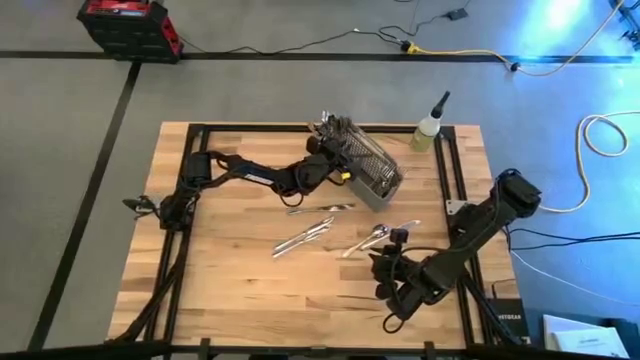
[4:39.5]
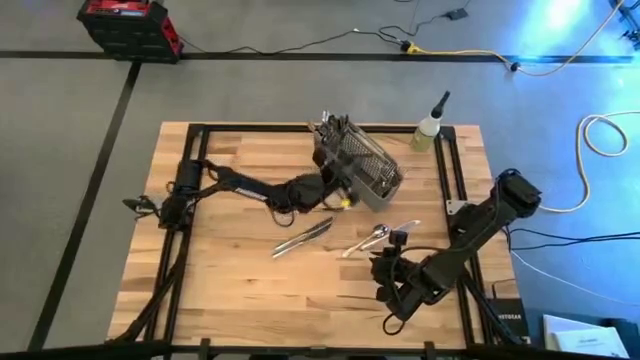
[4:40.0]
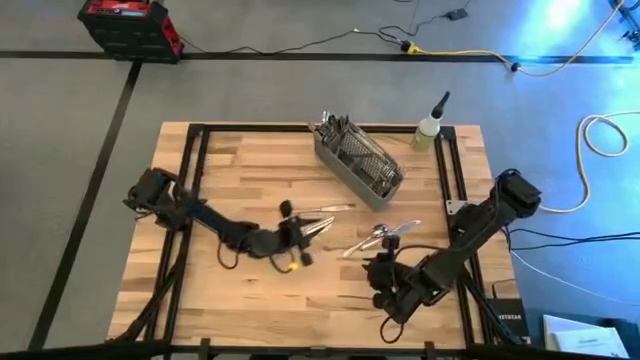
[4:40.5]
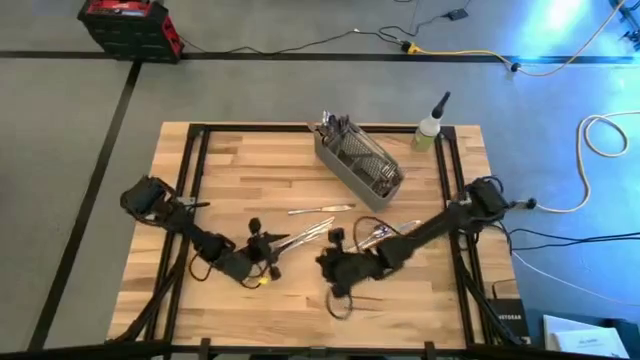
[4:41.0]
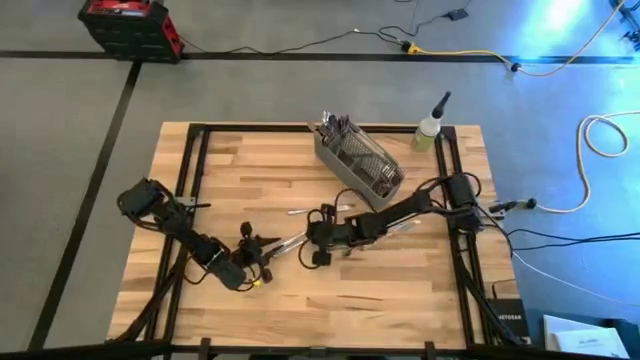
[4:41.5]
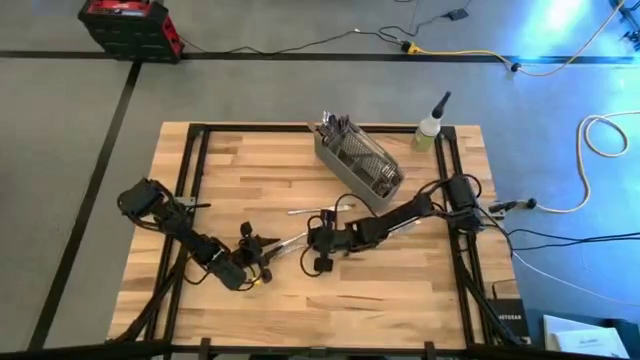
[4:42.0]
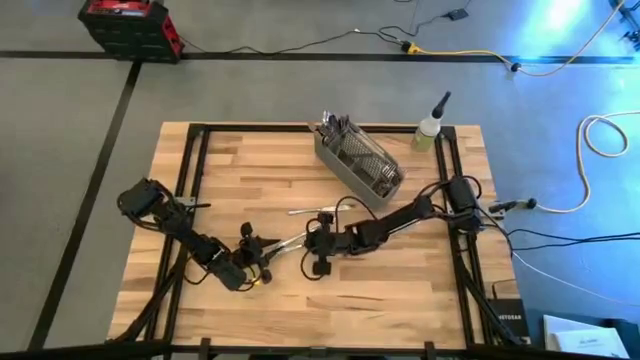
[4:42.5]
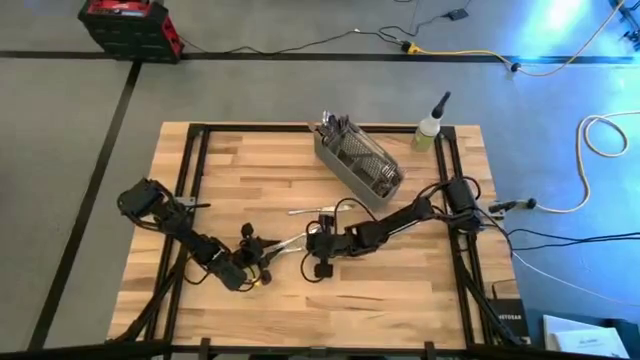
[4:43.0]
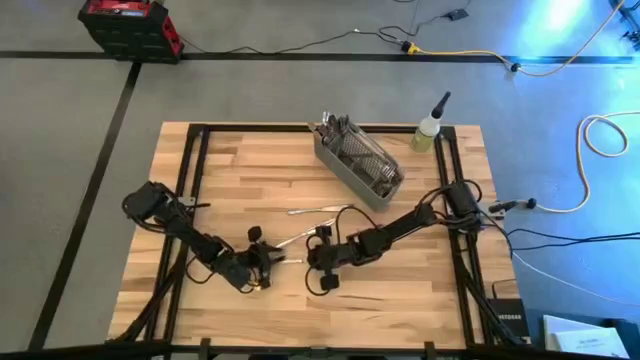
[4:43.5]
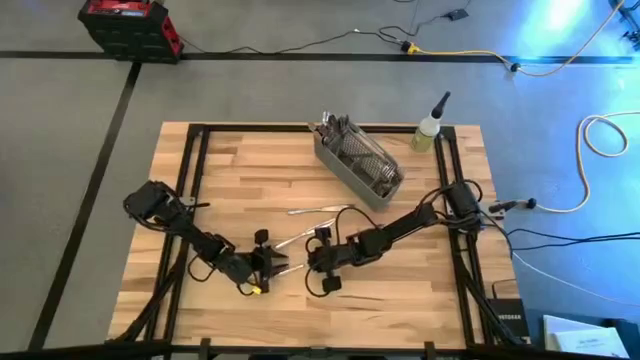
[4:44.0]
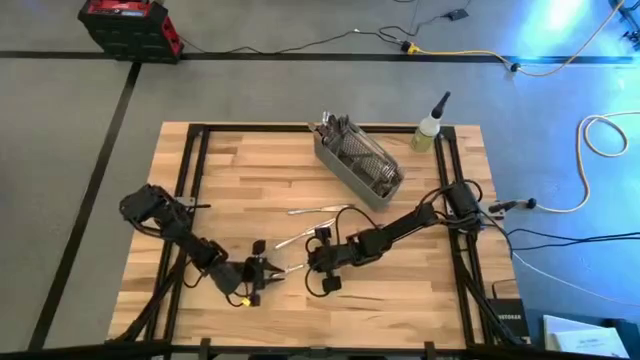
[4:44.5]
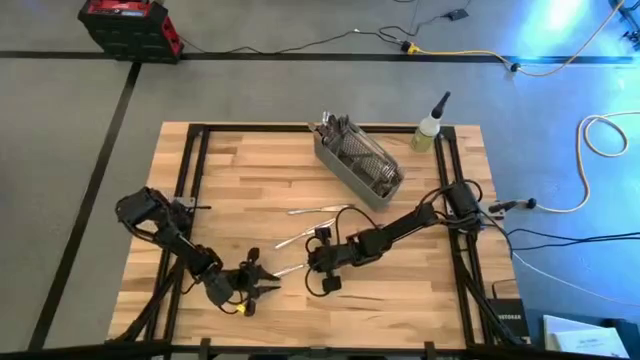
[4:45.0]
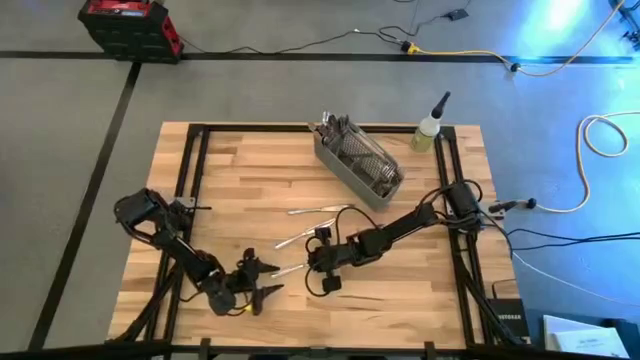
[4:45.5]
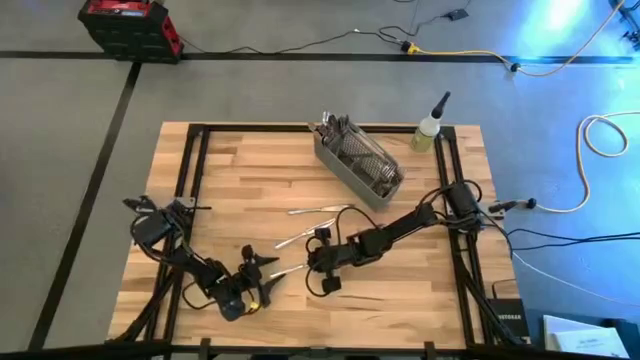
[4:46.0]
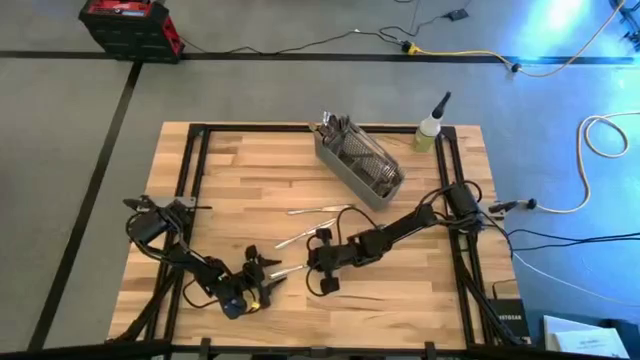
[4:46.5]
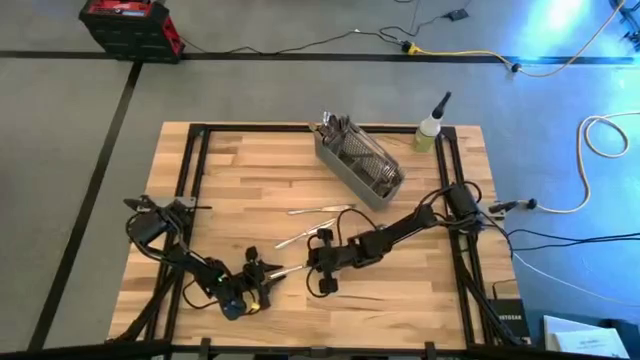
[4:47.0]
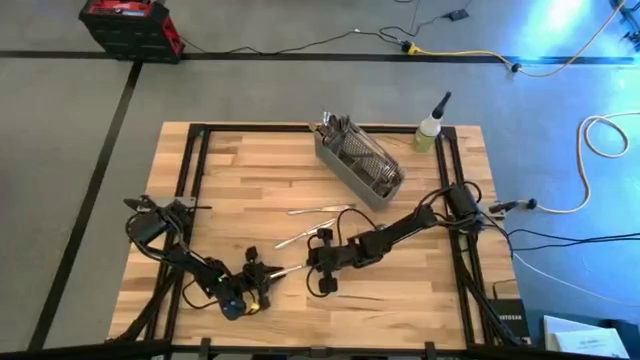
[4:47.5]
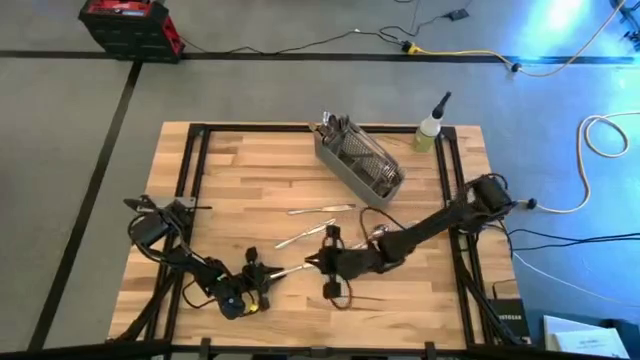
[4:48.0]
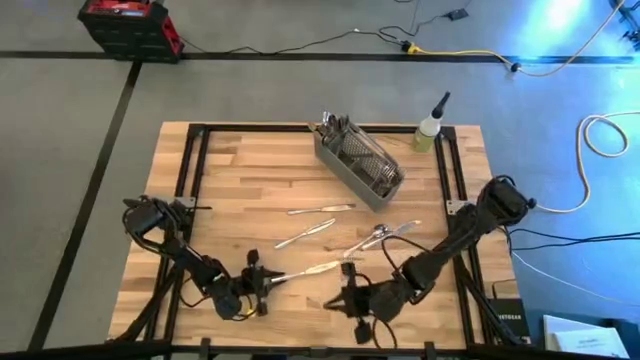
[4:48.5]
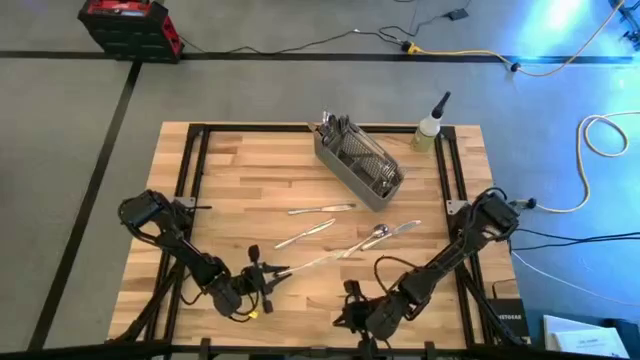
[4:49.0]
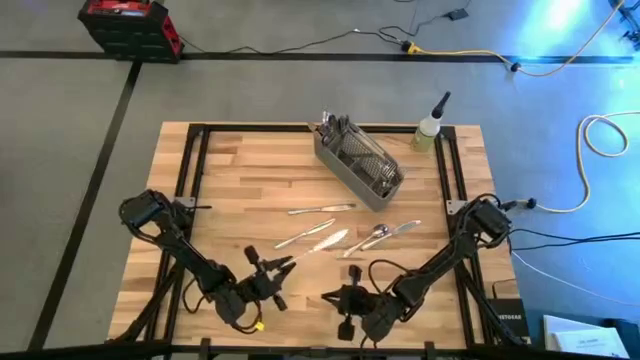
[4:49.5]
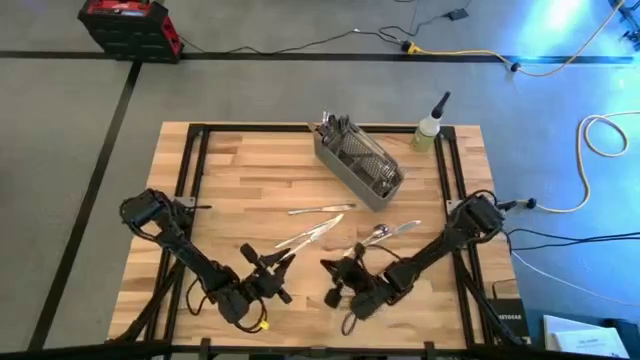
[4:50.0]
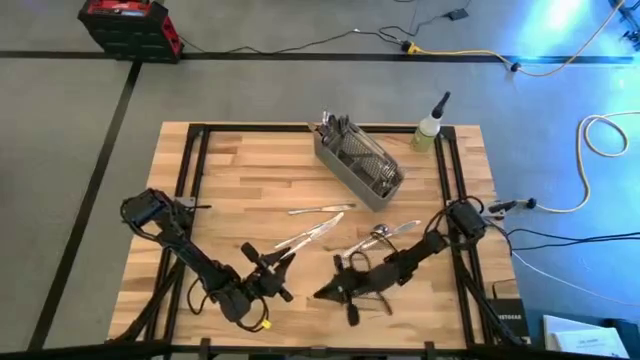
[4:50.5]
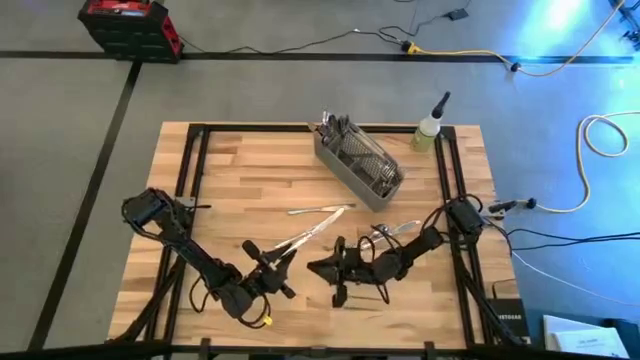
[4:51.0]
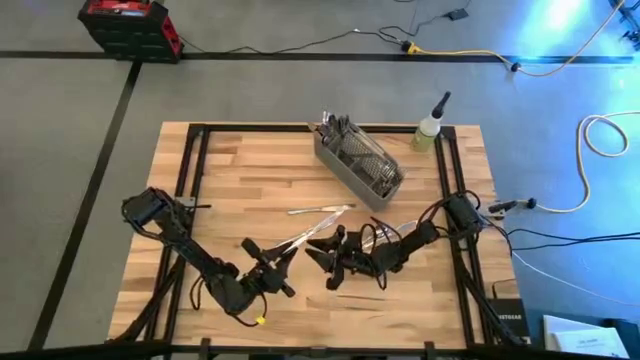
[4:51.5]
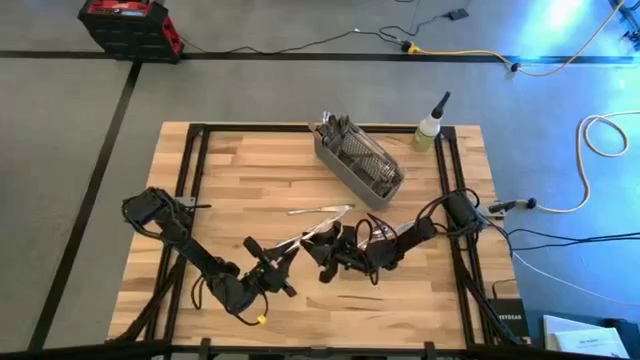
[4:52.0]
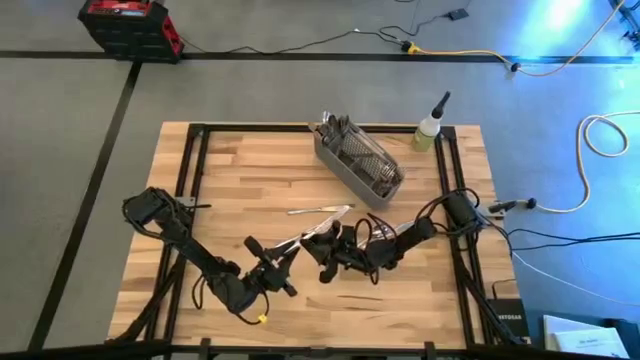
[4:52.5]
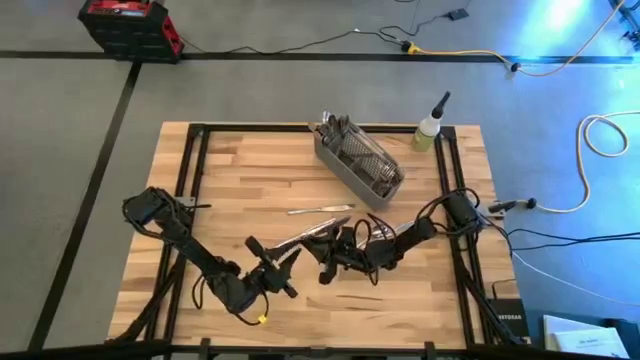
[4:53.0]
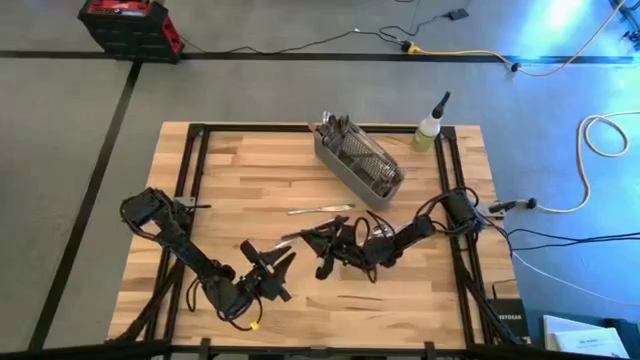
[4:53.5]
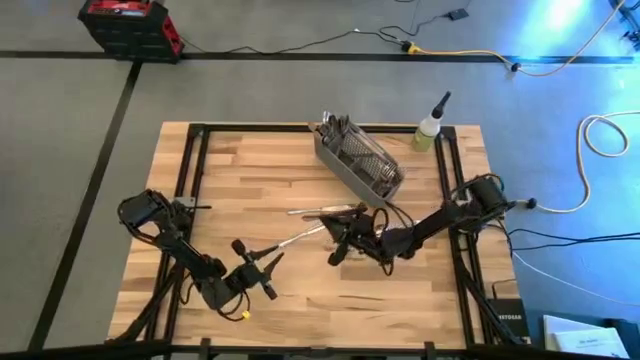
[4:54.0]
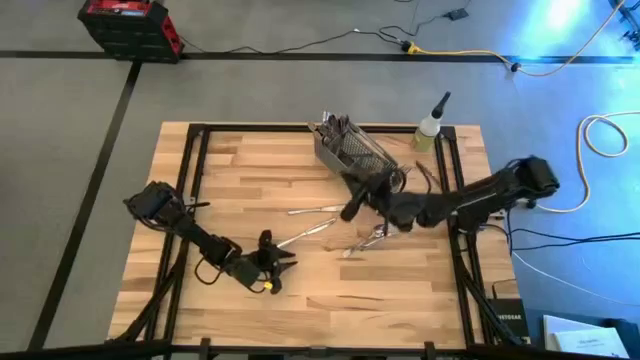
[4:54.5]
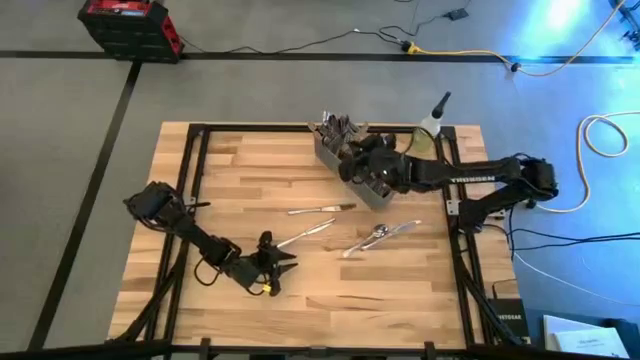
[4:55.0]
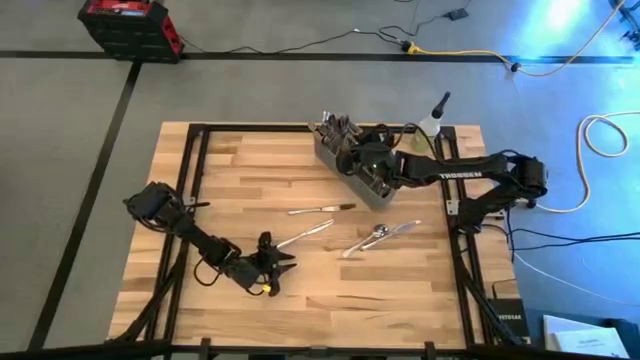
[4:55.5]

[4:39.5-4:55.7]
Task: Sort silverware
Put the silver knife into the gray silverware organizer

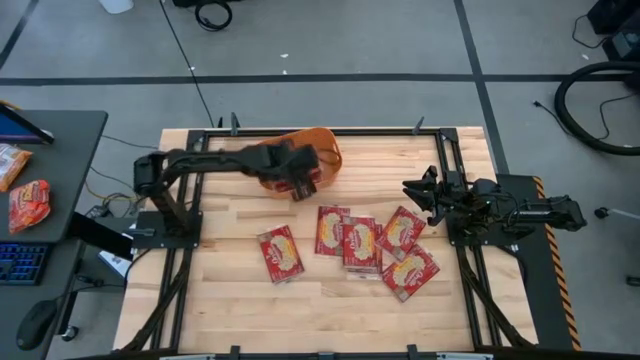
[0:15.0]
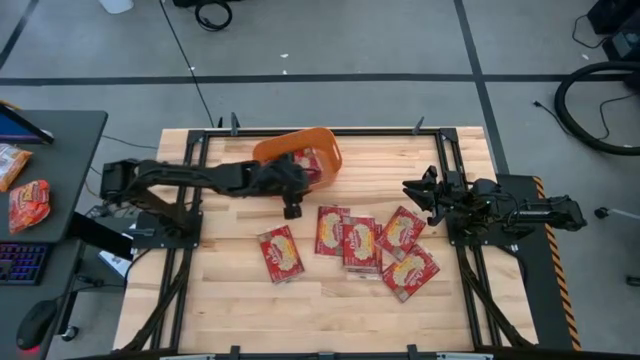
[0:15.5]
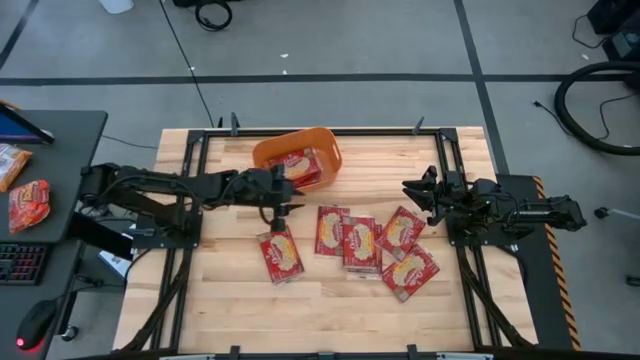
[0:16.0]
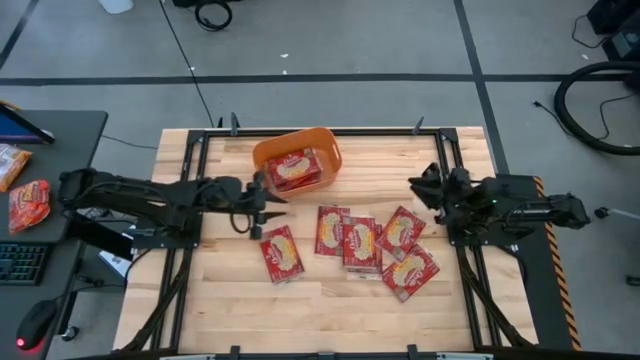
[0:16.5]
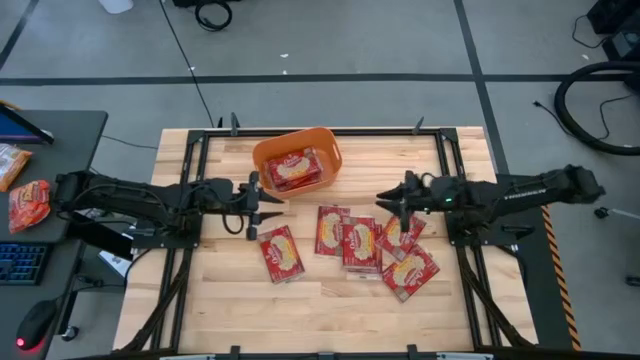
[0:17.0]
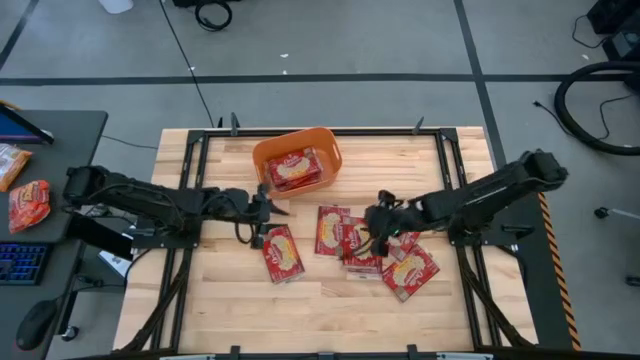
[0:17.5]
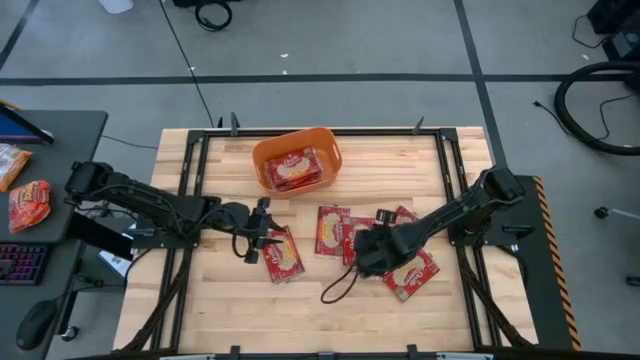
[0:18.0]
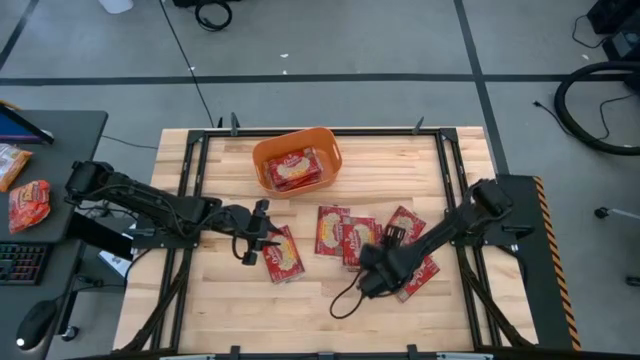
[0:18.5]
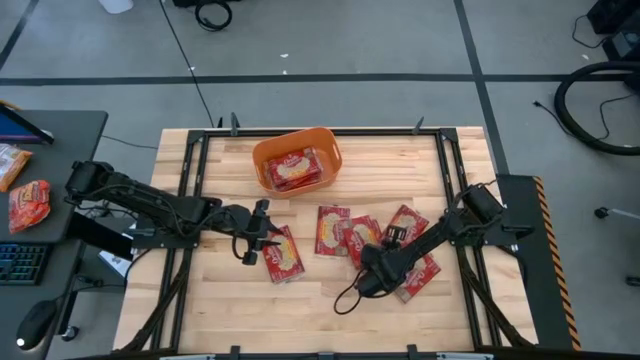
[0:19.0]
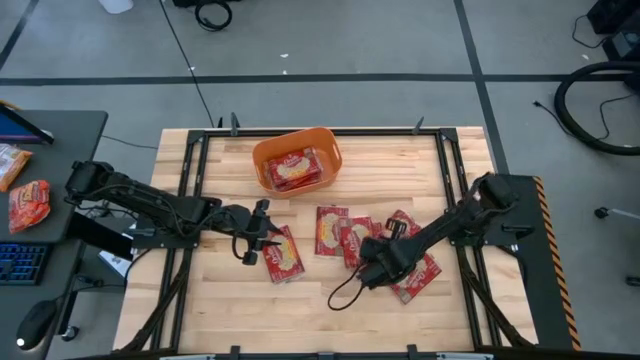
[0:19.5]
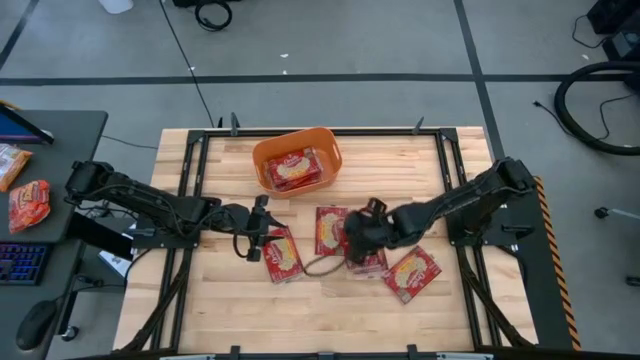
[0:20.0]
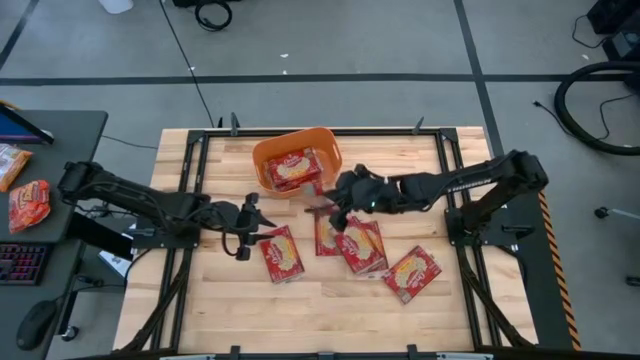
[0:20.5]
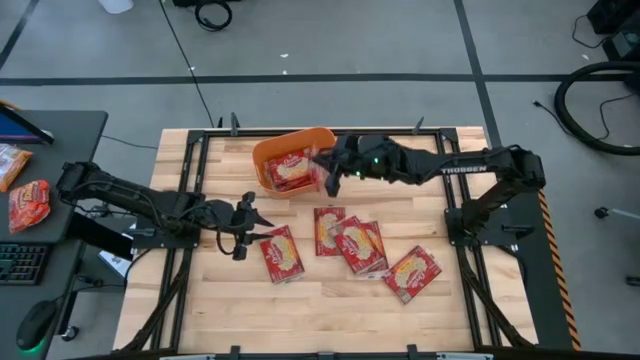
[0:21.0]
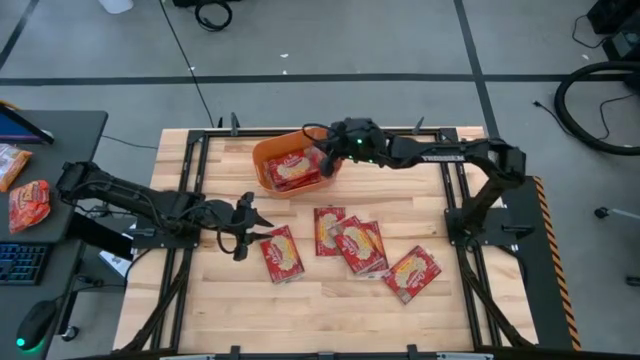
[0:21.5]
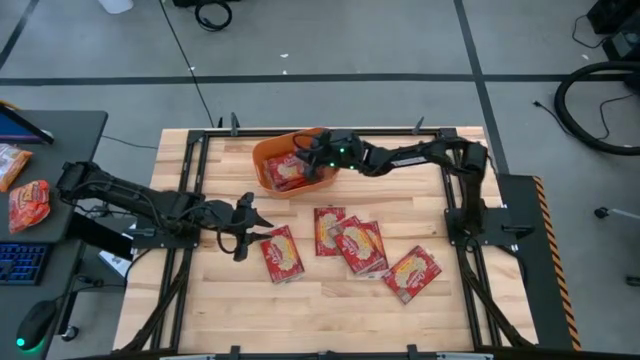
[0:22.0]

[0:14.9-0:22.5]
Task: Sort popcorn bags into baskets
Put the red popcorn bag into the orange bin
